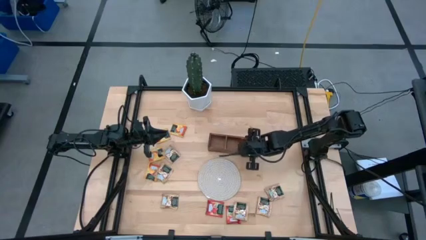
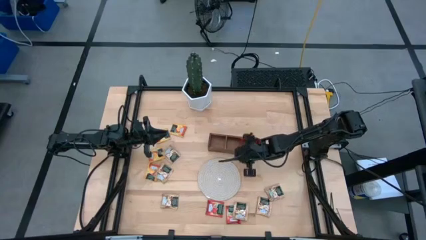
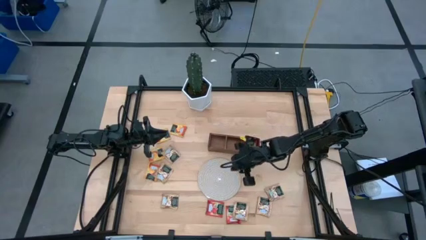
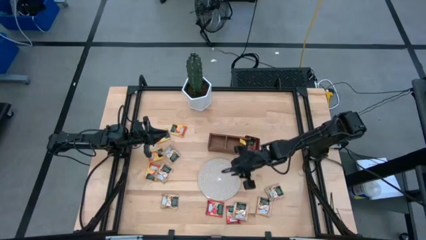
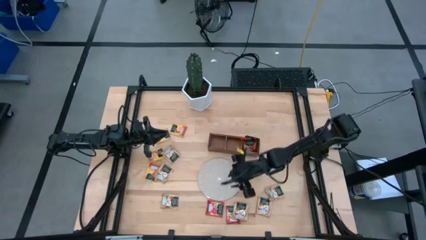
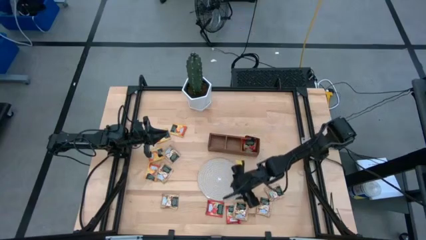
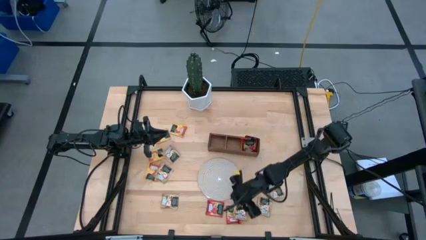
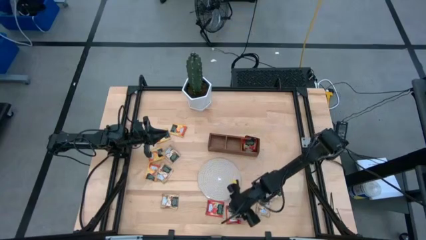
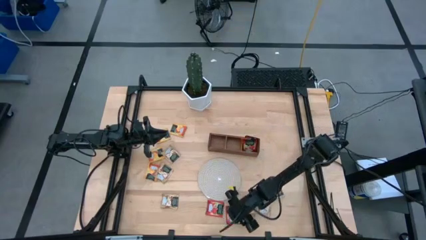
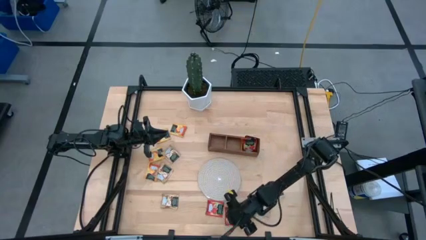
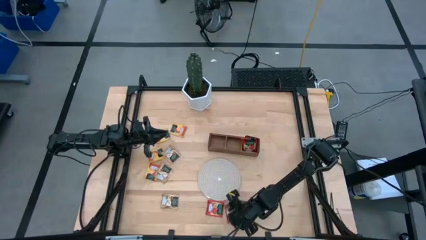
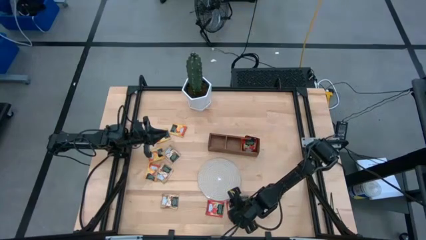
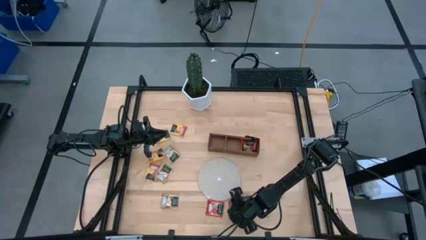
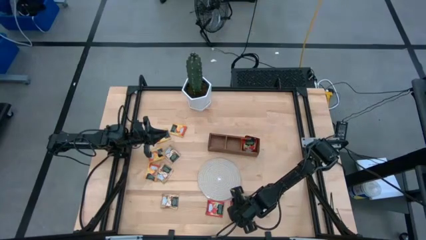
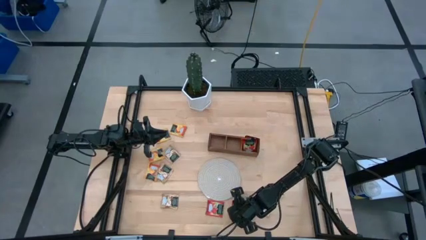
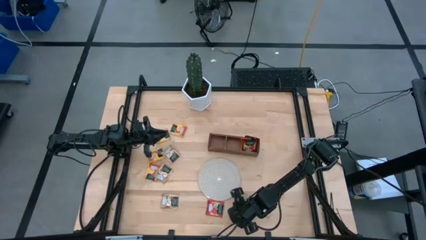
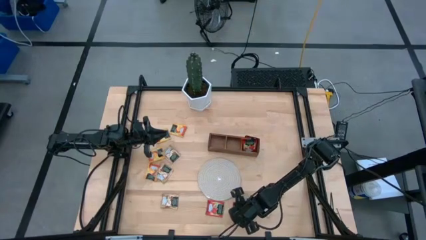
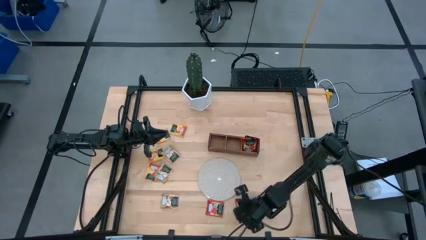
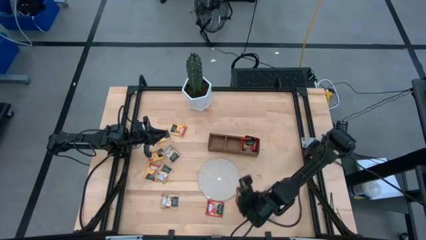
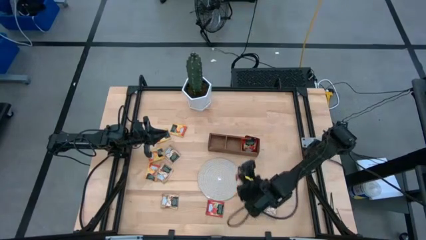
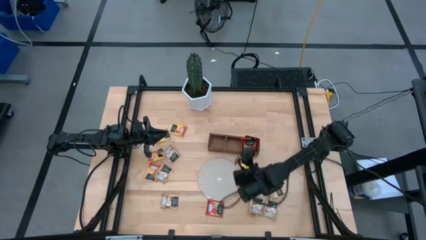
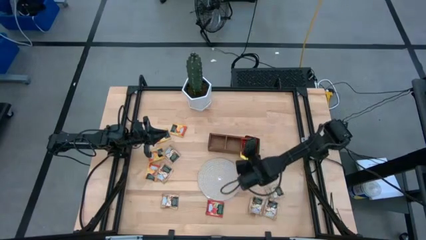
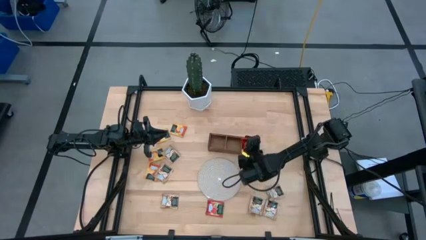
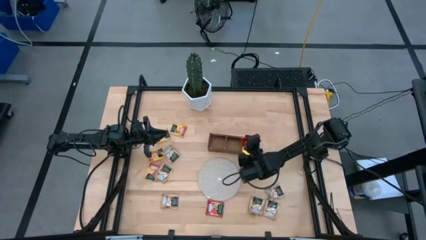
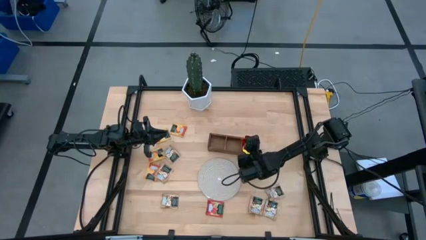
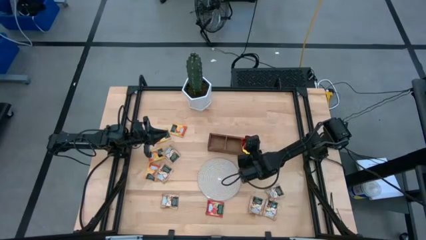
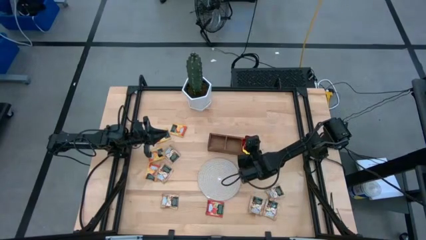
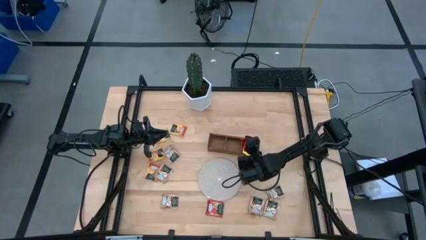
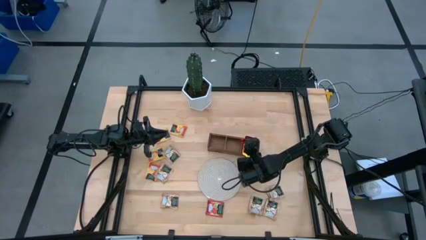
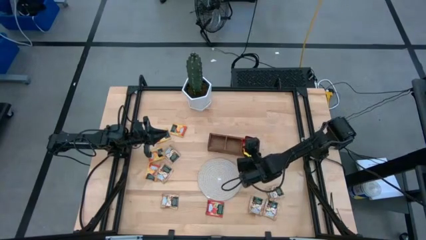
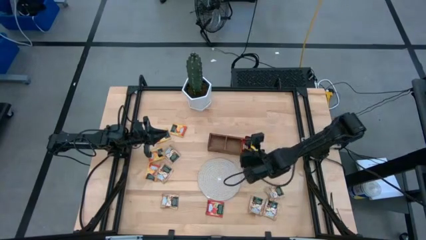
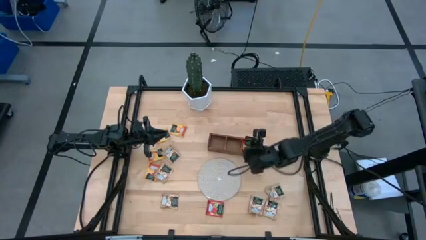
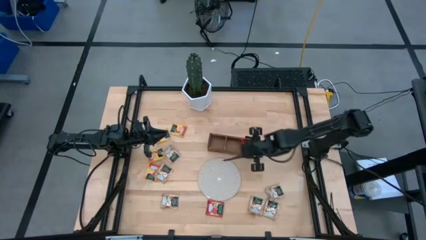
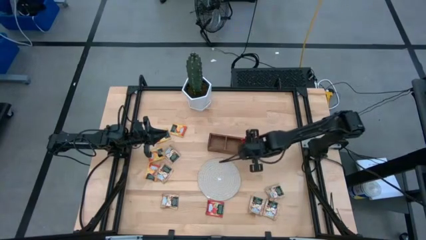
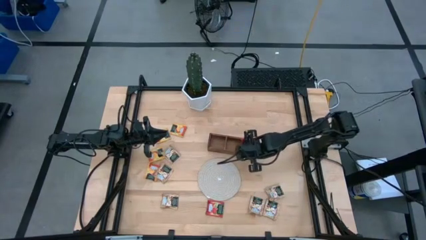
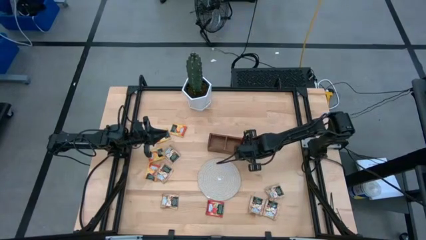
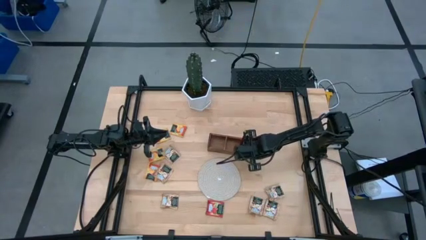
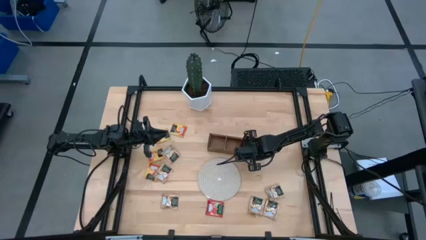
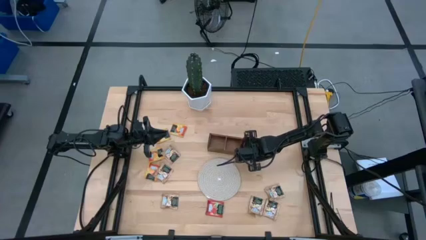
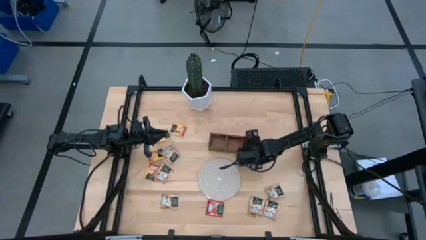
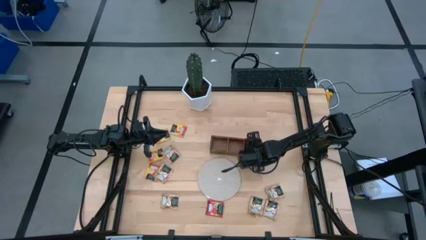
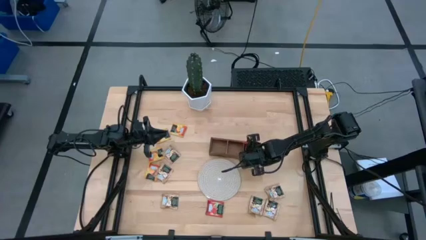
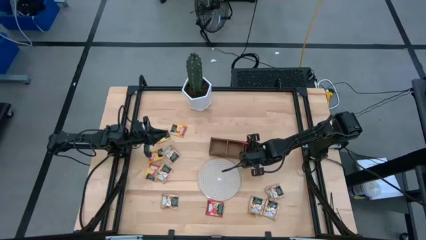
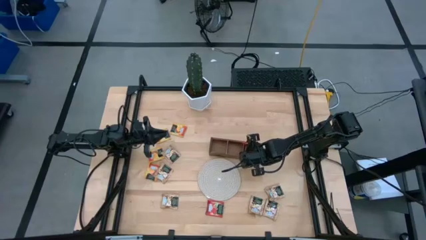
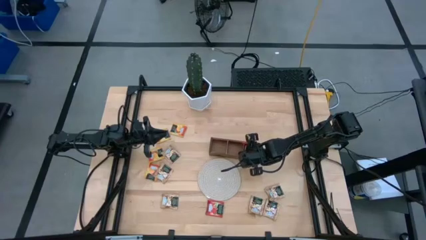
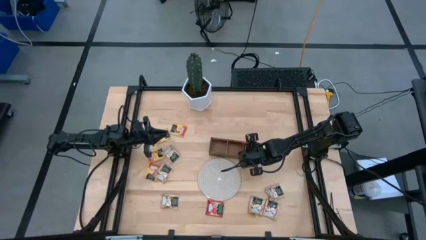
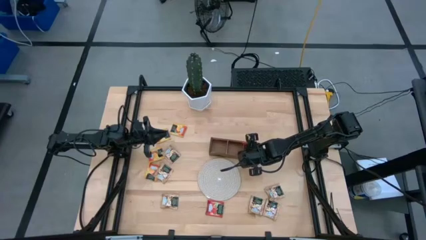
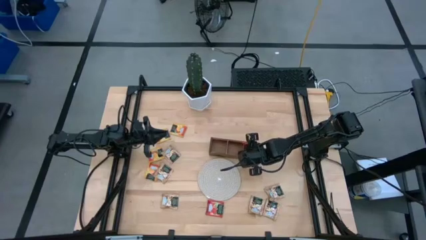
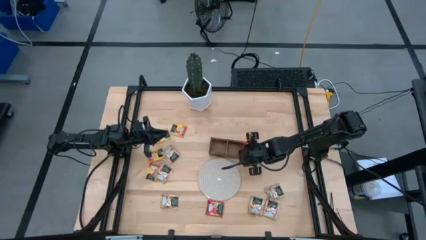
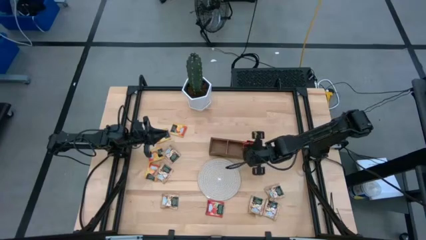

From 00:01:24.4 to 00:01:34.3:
Task: Pick & Place Tea
Put the red tea bag into the right section of the wooden organizer

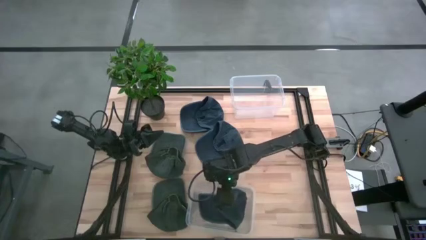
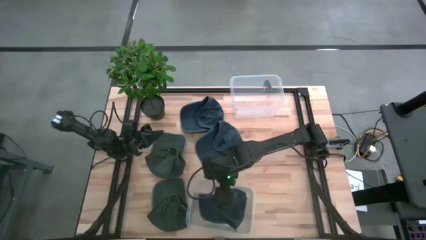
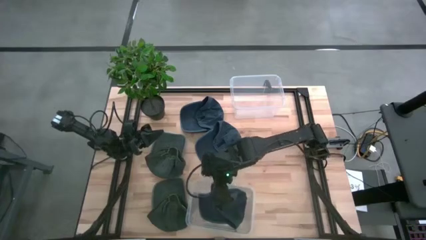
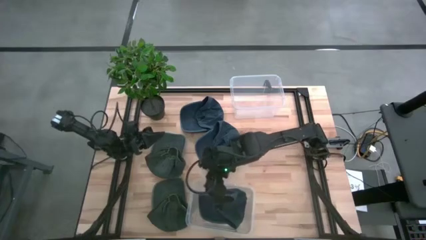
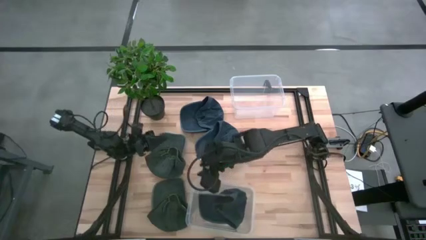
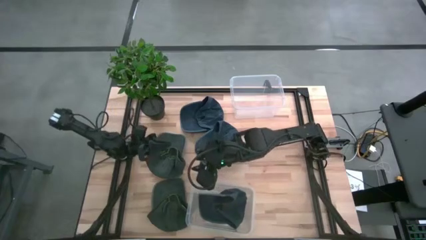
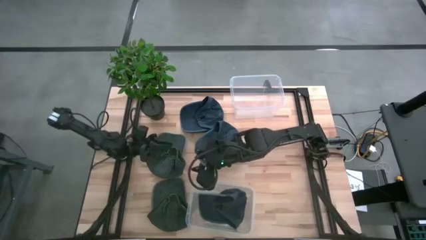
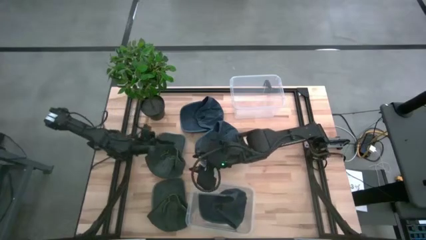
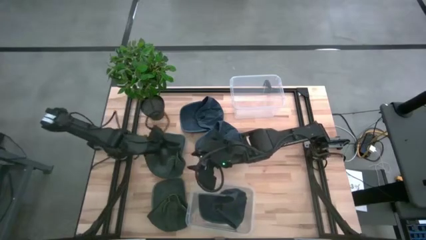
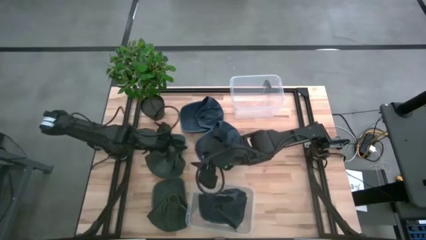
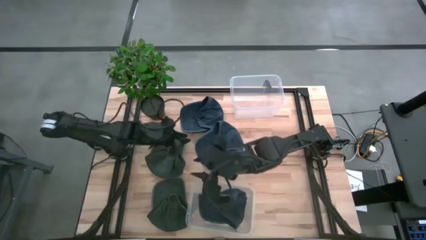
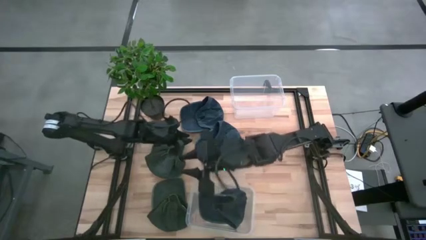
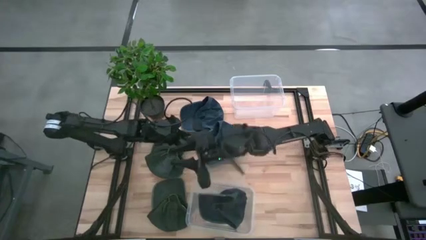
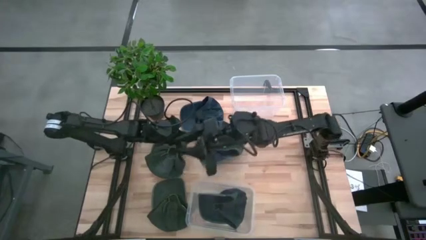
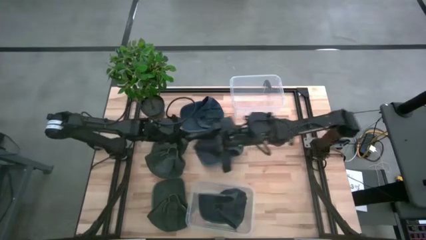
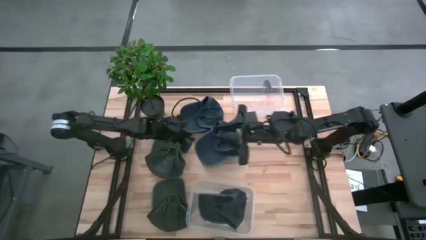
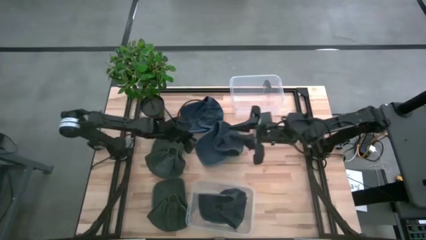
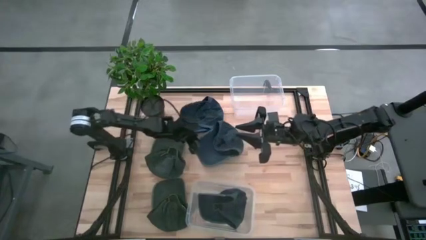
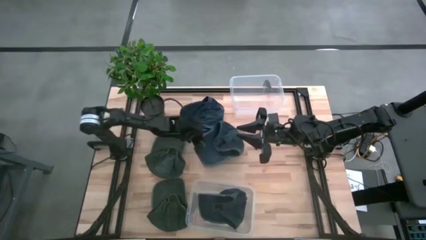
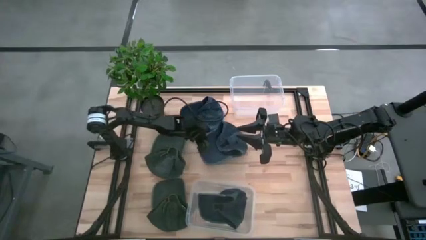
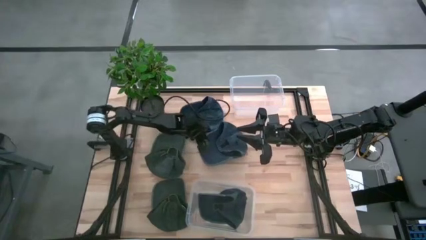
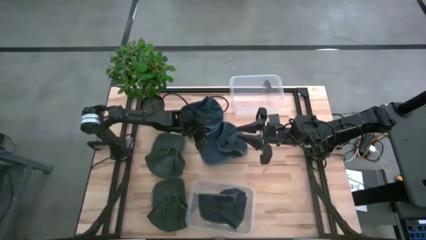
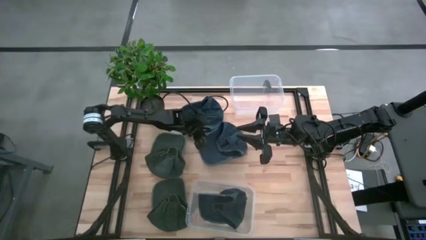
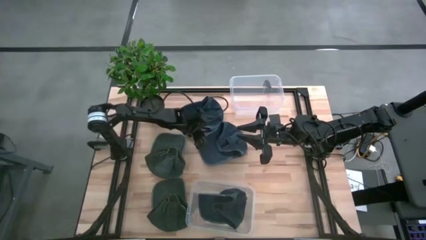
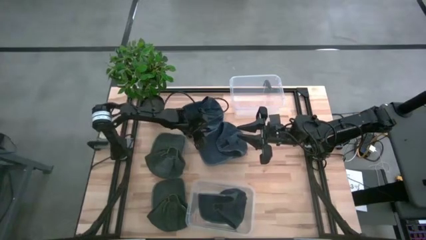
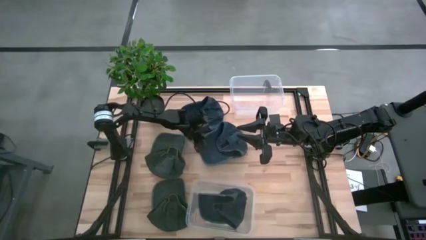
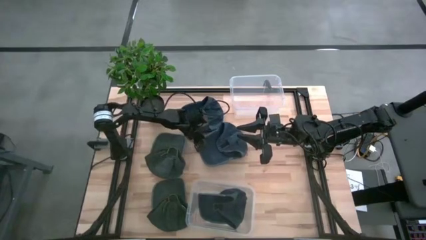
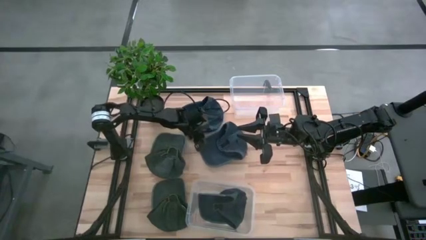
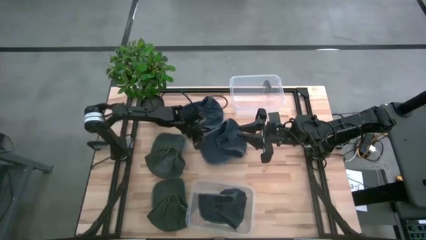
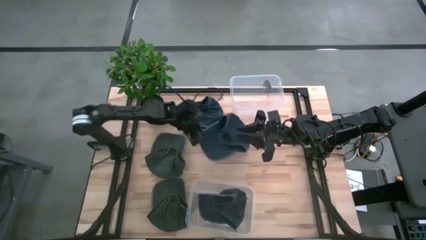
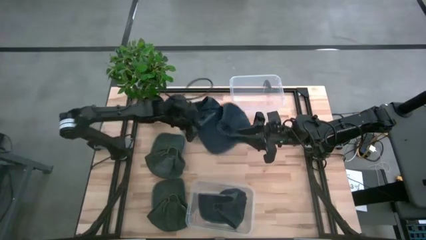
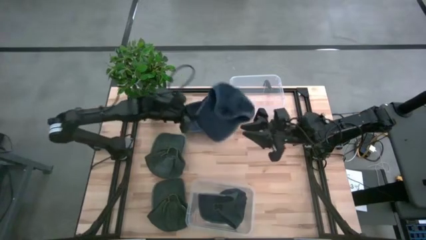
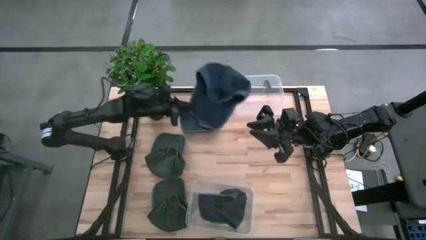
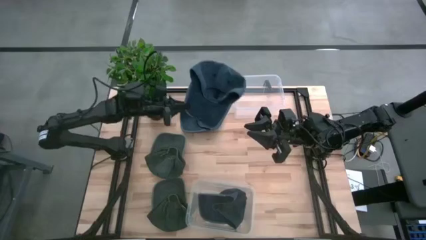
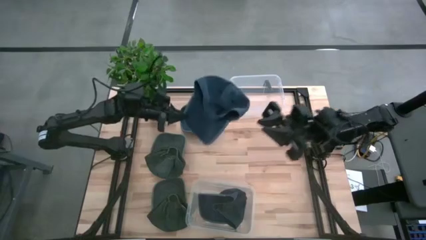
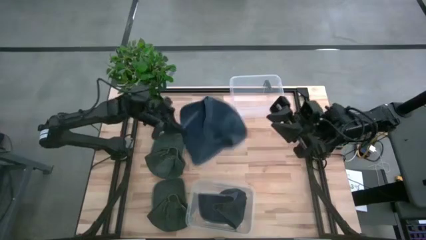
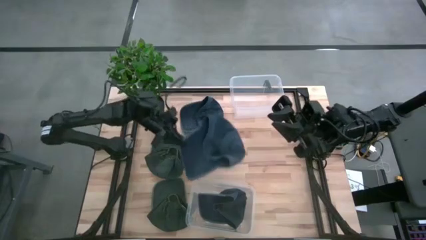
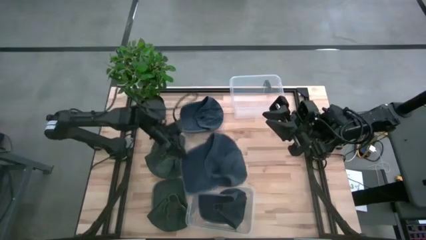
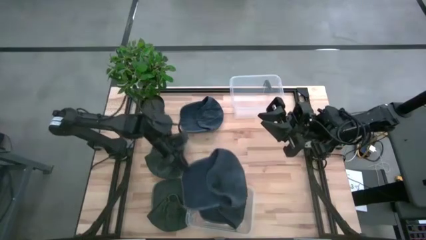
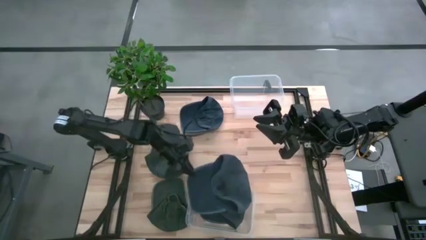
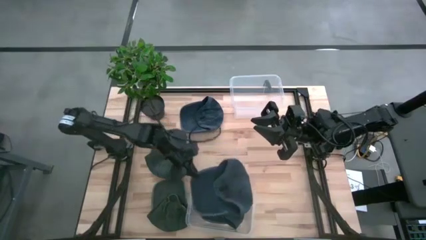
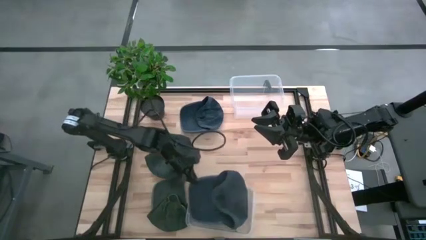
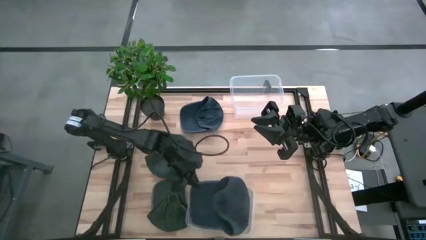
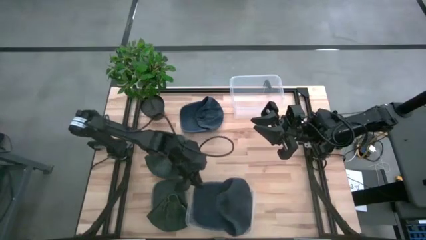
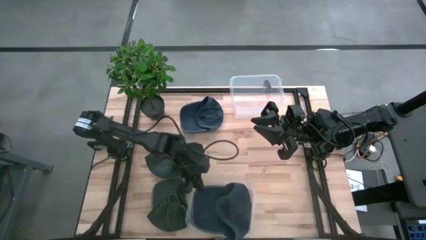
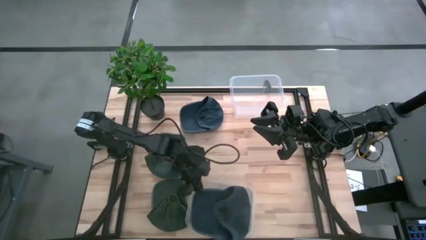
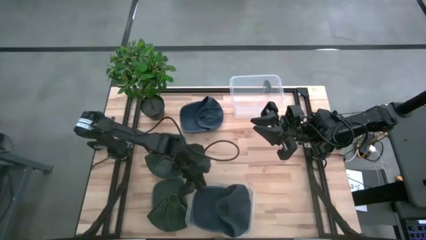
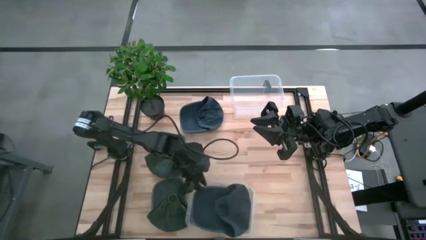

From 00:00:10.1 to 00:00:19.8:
Task: Pick & Place hat
Put the bottom blue cap into the bottom transparent bin
